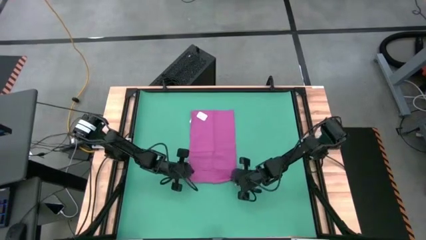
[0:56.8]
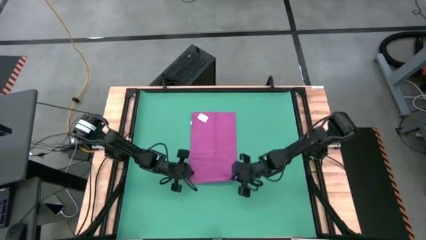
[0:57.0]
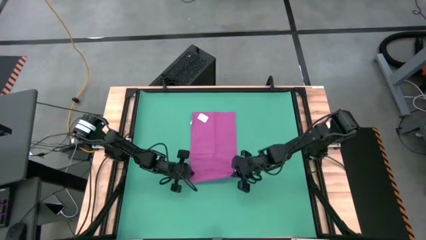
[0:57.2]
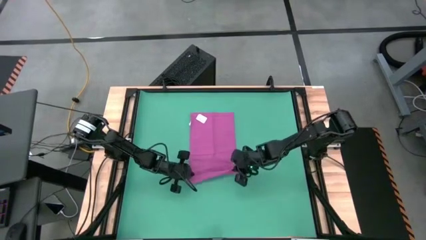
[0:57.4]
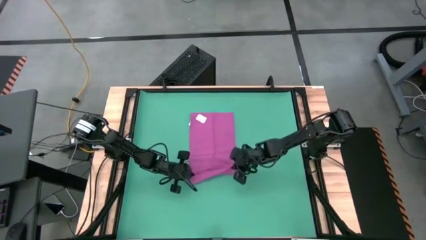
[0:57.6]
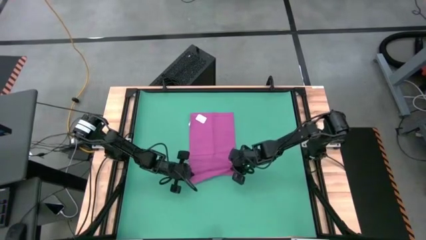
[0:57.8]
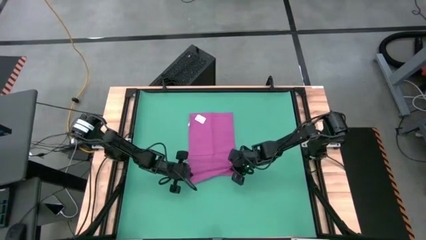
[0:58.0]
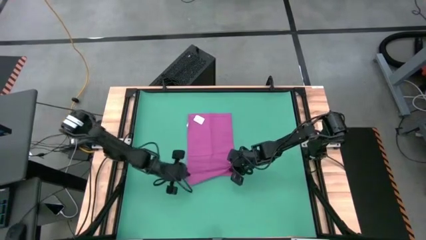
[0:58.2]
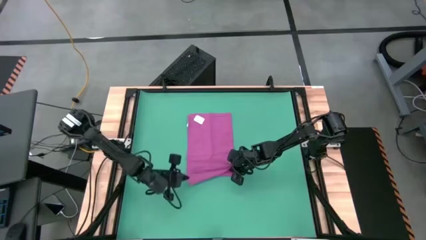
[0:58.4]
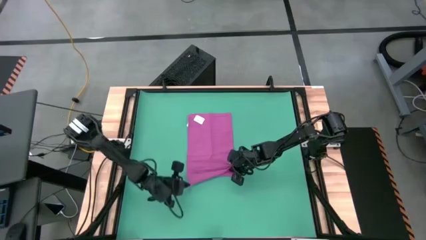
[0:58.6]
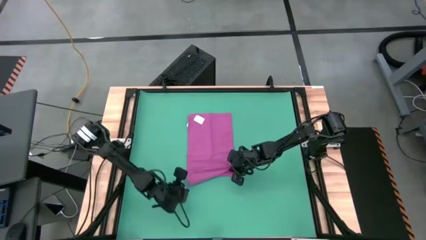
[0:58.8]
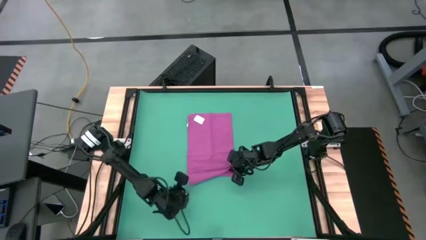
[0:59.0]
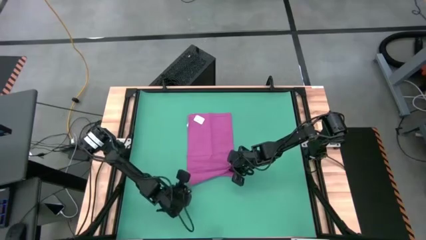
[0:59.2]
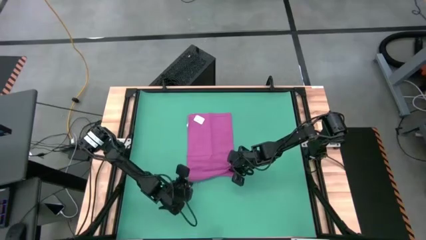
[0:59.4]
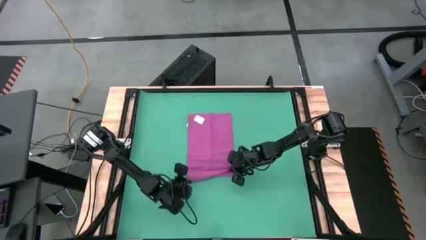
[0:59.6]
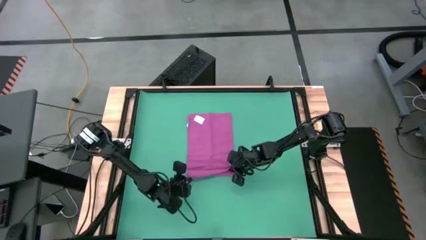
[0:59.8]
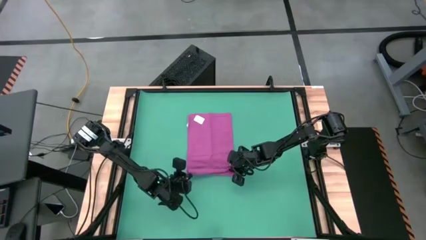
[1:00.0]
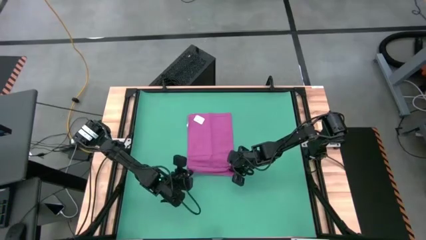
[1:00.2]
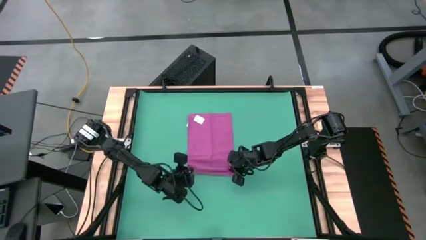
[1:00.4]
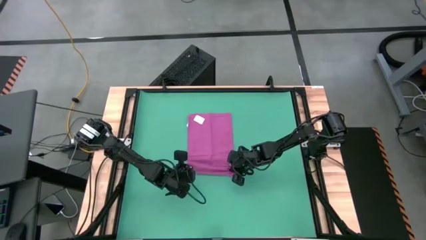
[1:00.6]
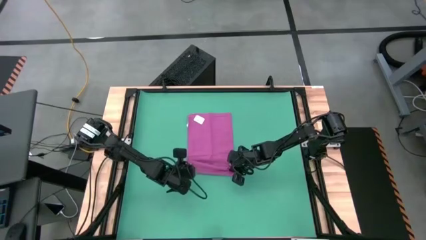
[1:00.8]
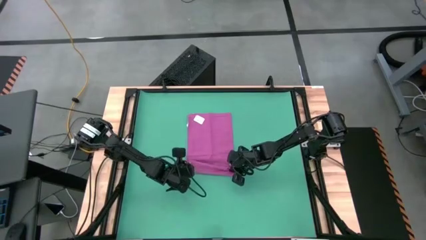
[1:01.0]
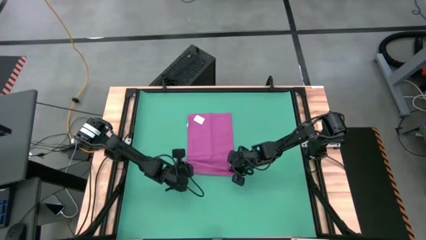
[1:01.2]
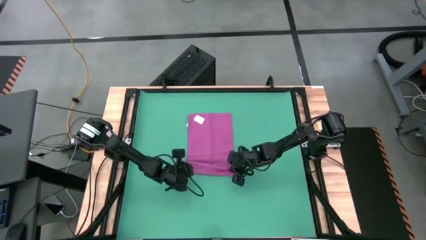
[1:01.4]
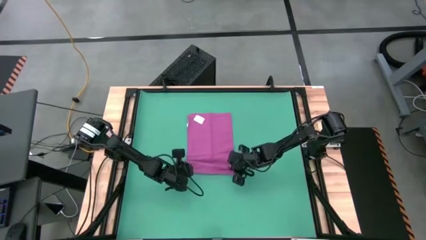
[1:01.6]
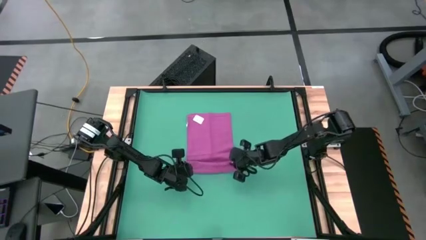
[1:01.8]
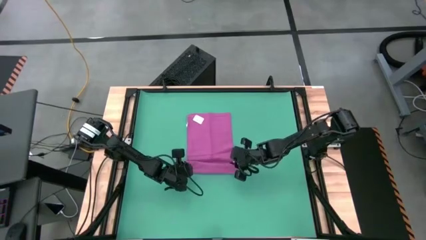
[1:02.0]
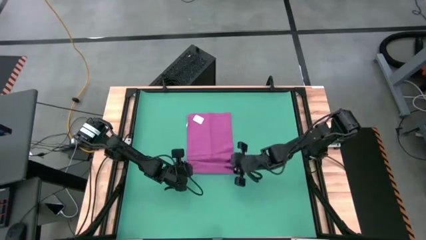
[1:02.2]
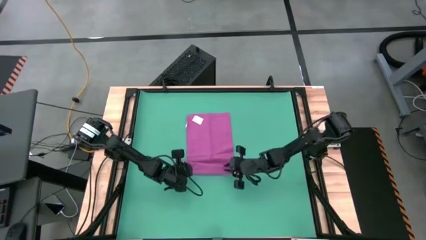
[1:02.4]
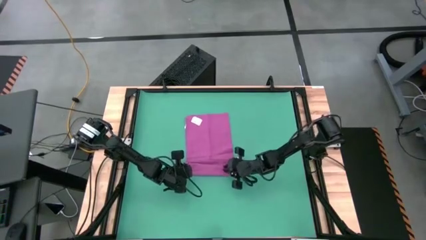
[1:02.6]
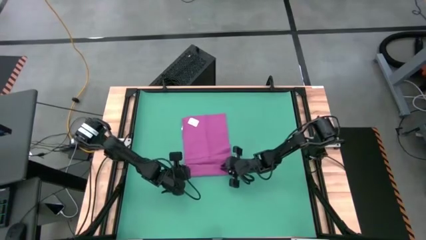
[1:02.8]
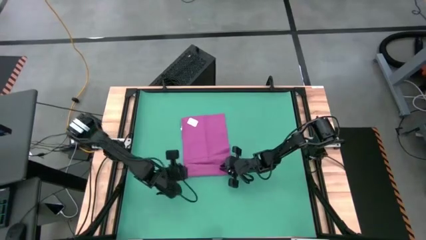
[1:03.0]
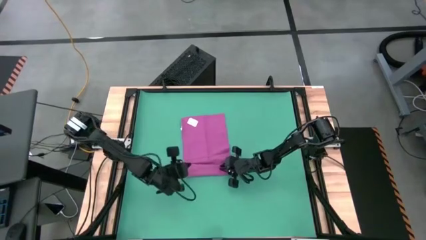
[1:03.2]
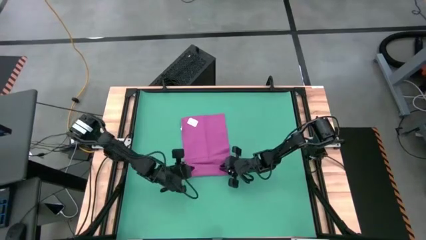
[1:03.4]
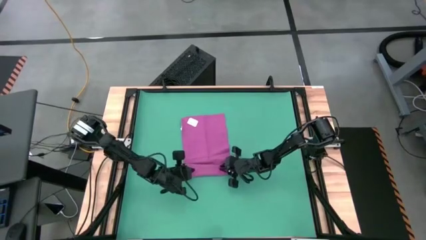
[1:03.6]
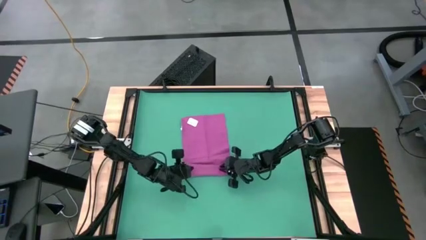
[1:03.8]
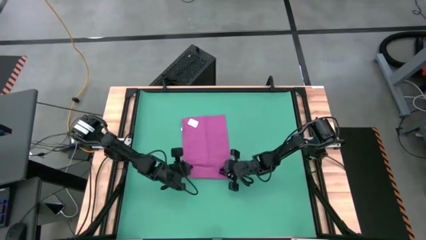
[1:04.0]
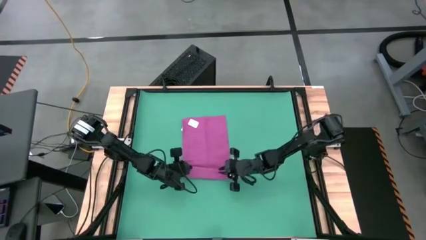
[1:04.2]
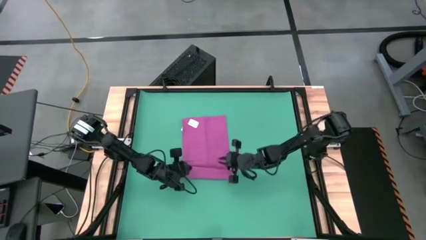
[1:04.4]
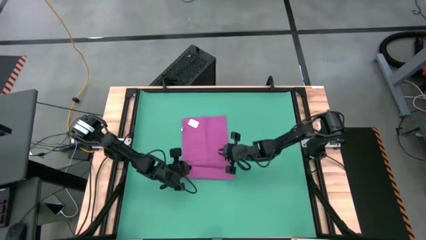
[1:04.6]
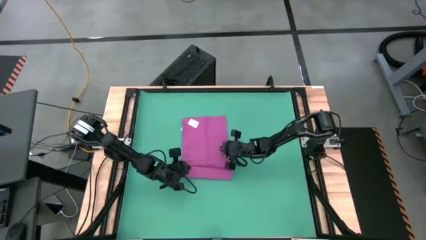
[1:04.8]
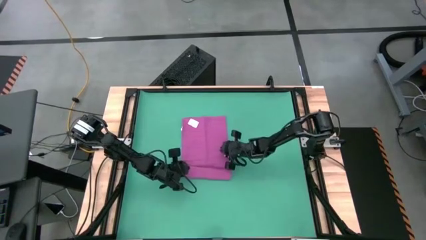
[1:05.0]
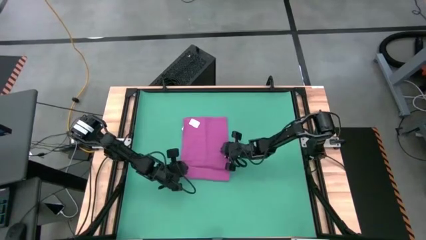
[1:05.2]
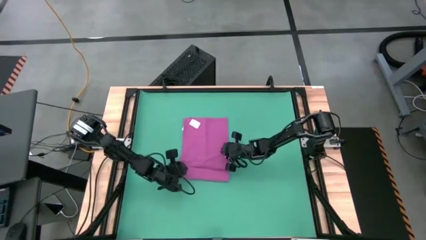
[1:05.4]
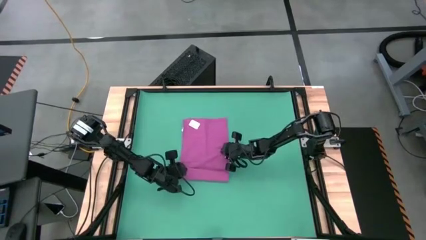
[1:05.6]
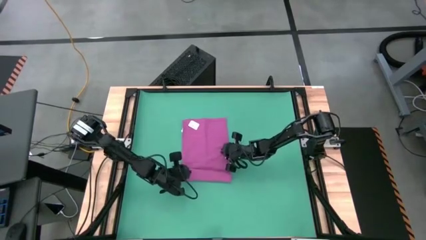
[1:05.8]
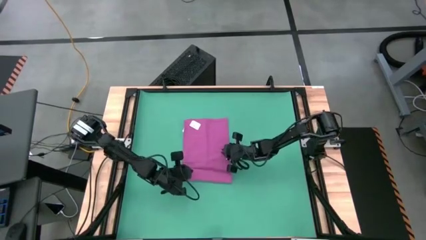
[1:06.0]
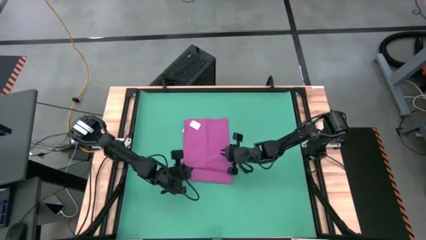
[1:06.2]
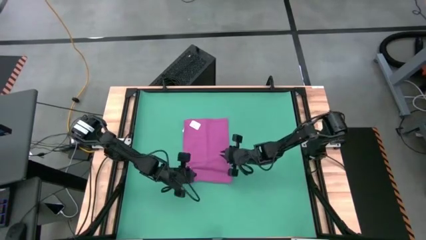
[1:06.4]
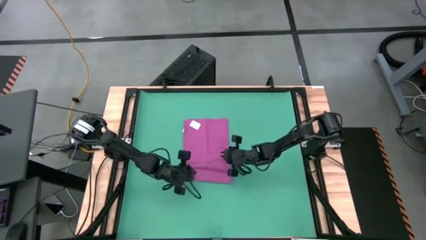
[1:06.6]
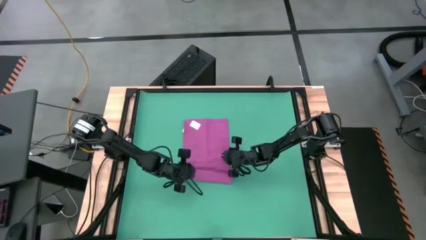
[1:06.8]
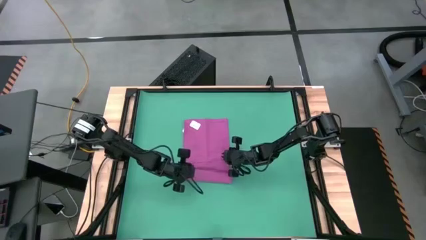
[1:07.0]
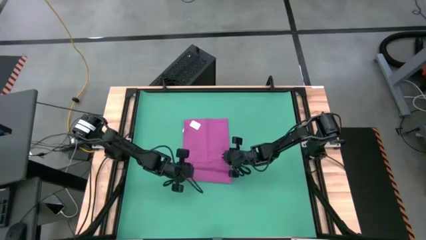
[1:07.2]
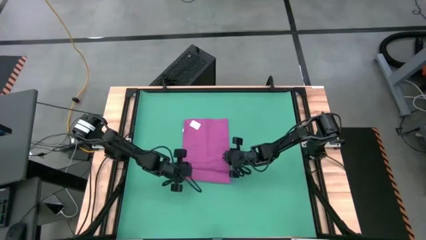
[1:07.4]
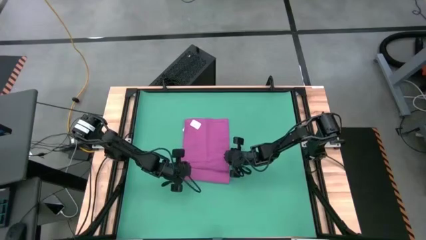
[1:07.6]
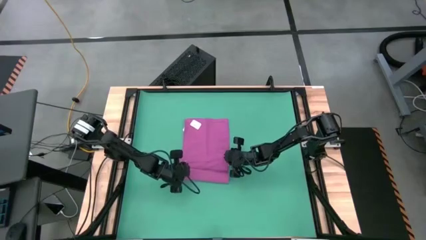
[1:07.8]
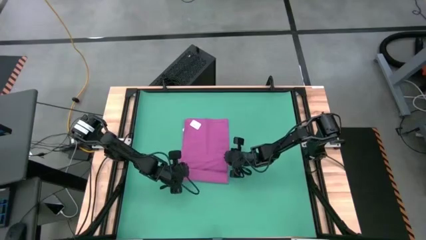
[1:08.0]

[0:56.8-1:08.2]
Task: Roll towel
Roll the violet towel

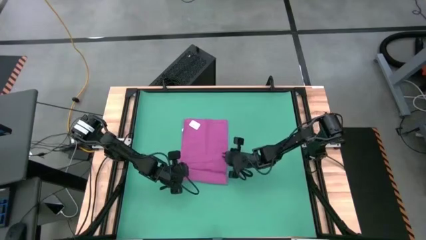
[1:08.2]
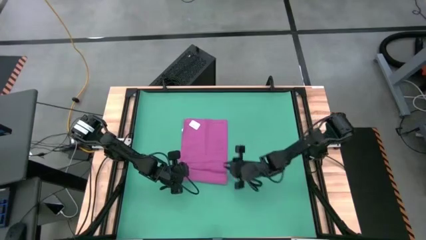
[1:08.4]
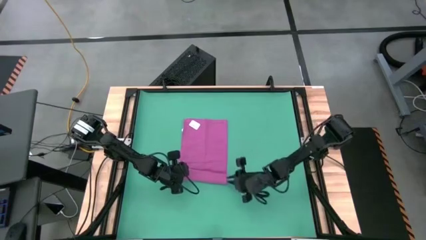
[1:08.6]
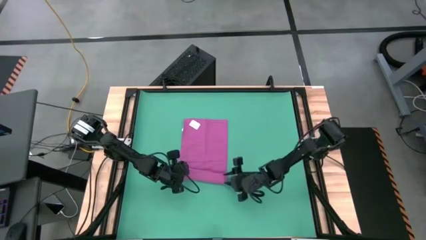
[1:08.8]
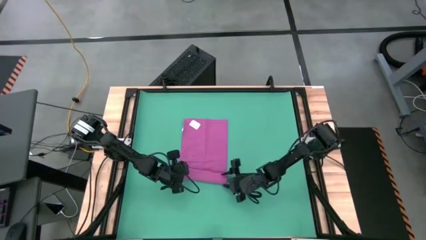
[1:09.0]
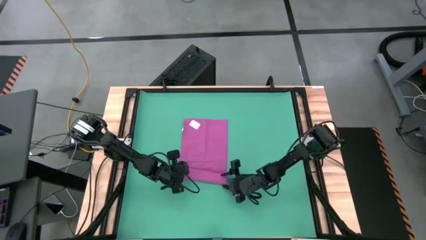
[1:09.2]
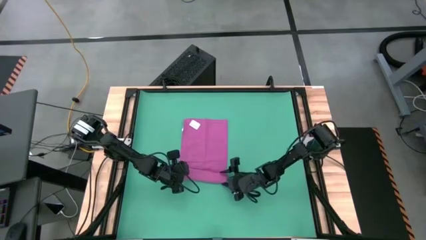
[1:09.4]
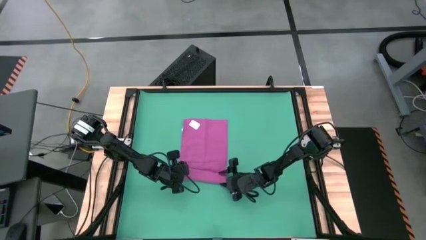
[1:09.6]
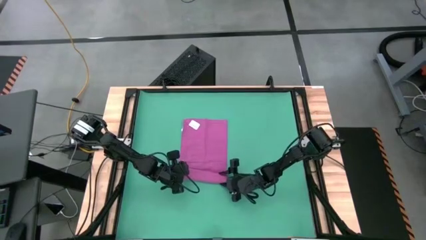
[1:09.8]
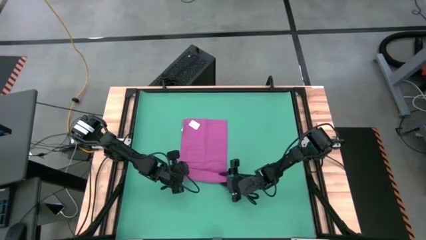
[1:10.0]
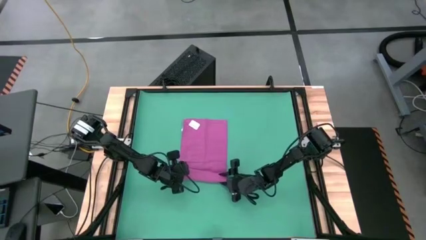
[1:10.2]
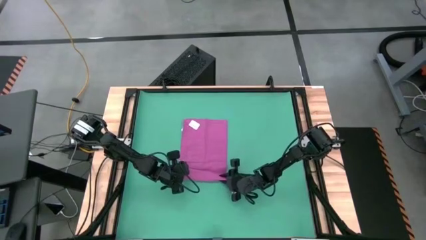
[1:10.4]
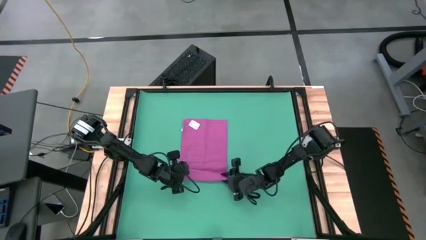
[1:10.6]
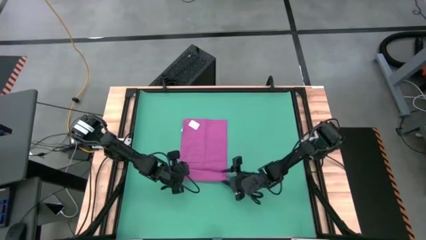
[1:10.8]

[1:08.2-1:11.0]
Roll the violet towel
